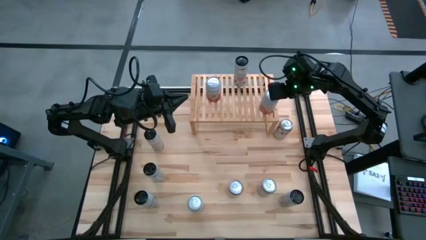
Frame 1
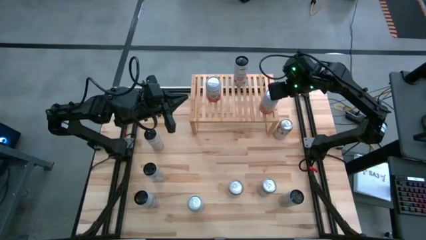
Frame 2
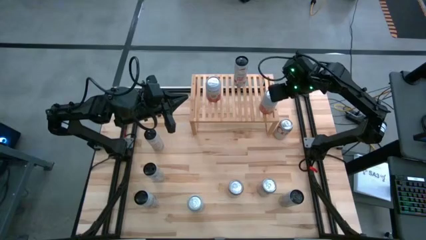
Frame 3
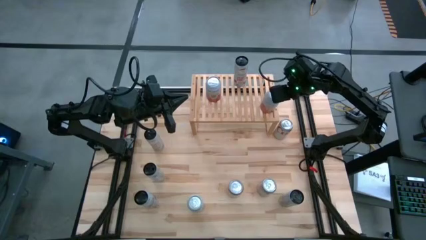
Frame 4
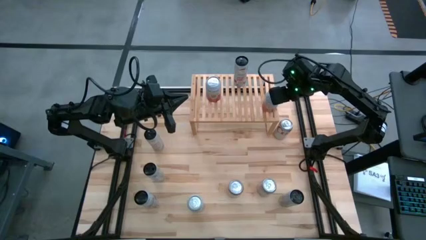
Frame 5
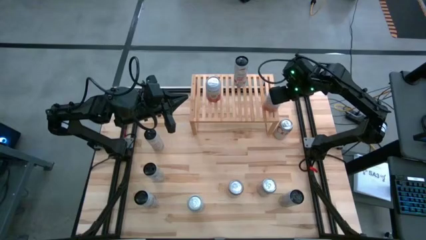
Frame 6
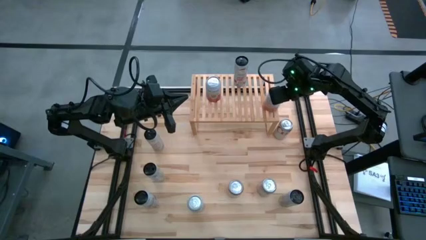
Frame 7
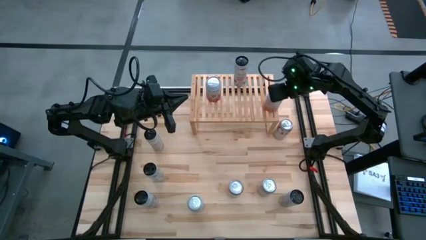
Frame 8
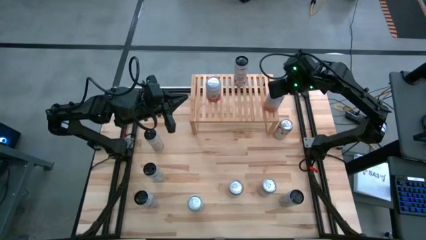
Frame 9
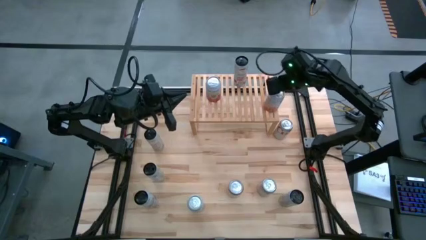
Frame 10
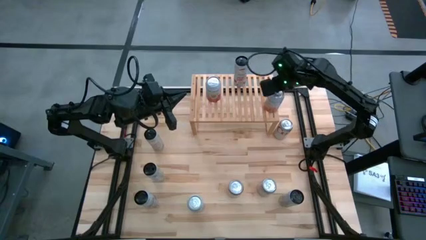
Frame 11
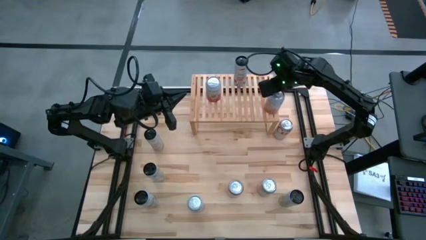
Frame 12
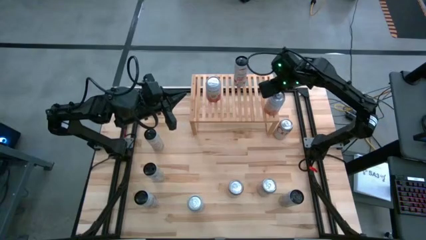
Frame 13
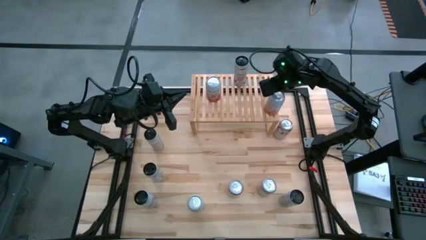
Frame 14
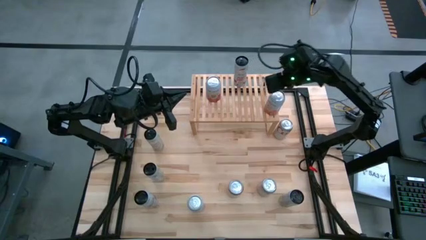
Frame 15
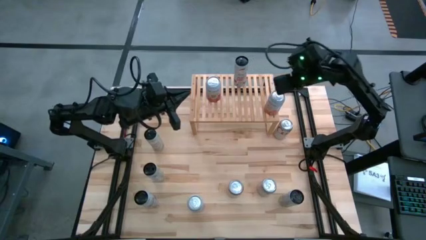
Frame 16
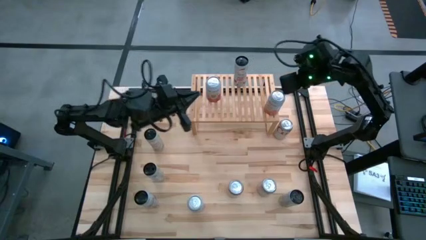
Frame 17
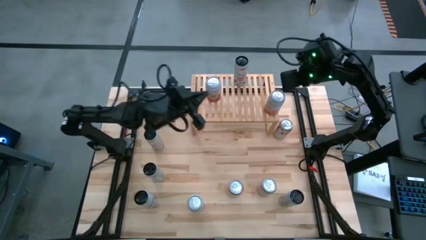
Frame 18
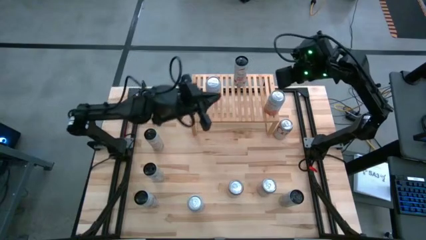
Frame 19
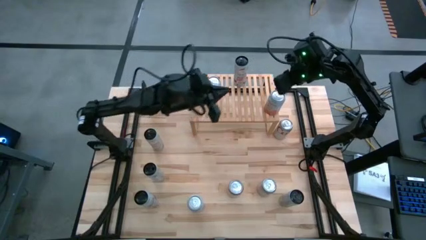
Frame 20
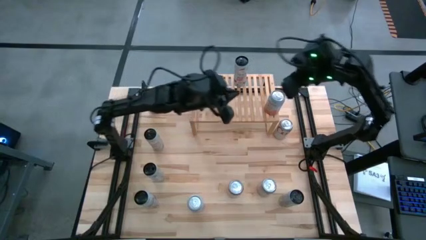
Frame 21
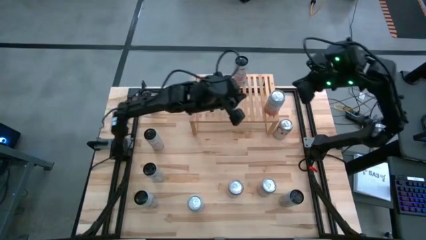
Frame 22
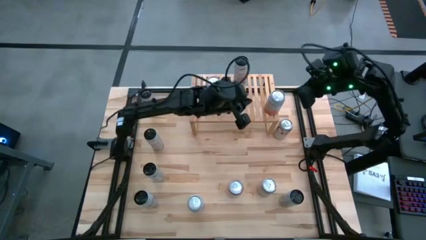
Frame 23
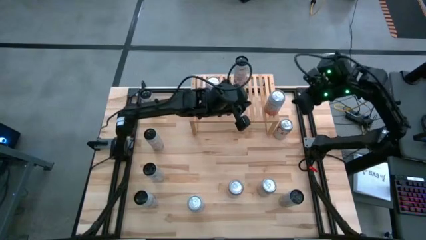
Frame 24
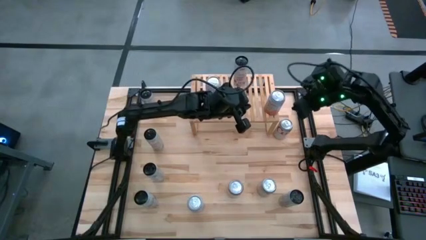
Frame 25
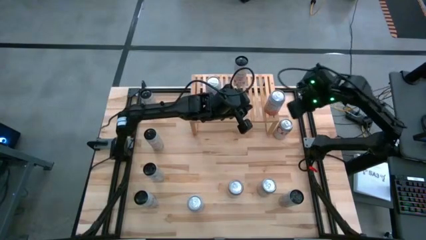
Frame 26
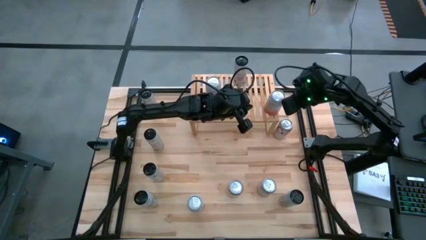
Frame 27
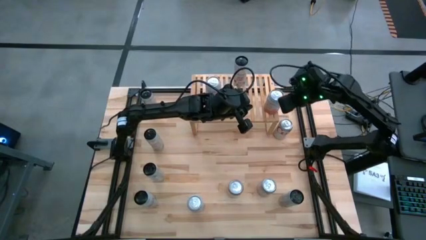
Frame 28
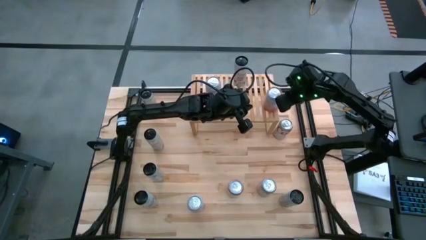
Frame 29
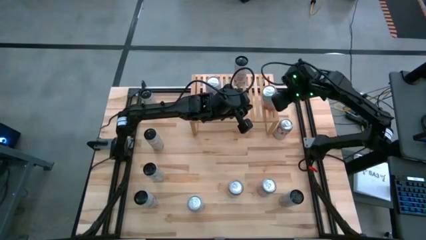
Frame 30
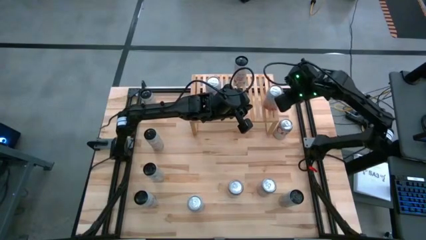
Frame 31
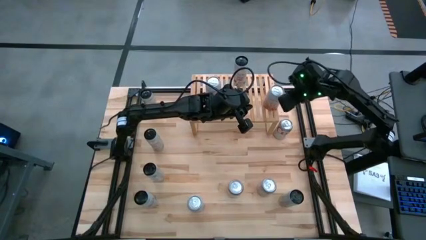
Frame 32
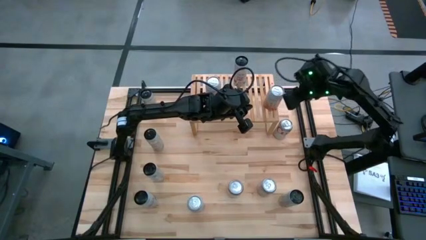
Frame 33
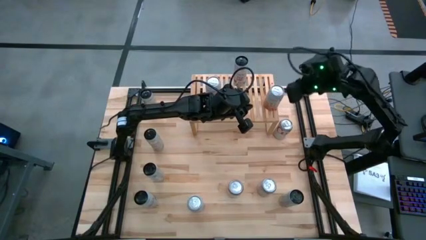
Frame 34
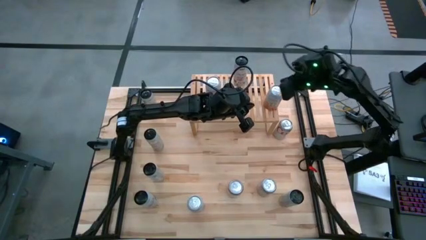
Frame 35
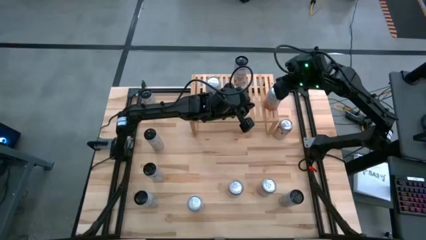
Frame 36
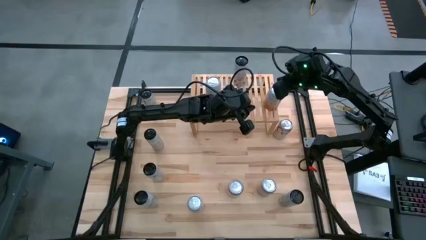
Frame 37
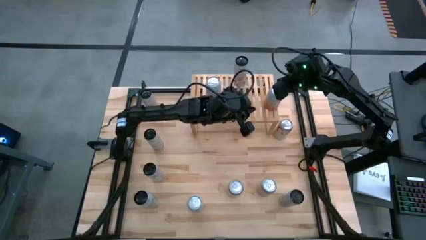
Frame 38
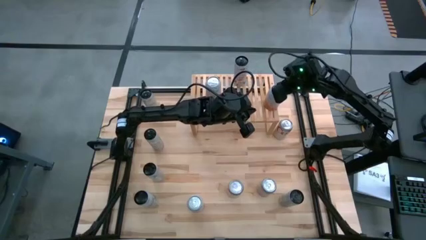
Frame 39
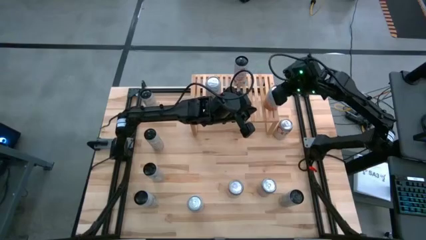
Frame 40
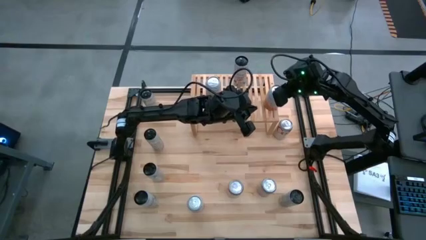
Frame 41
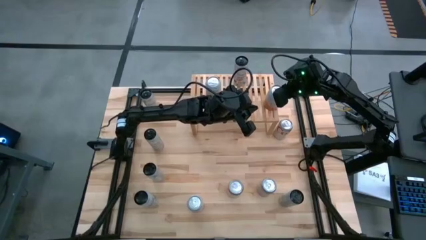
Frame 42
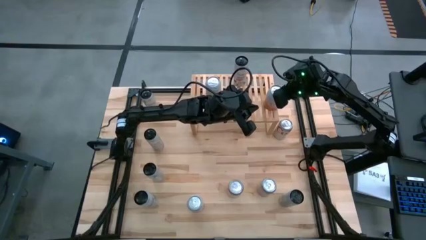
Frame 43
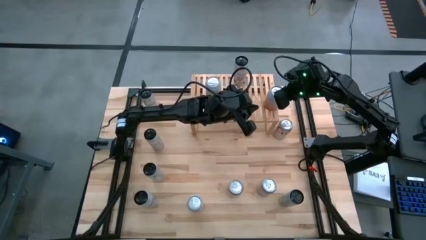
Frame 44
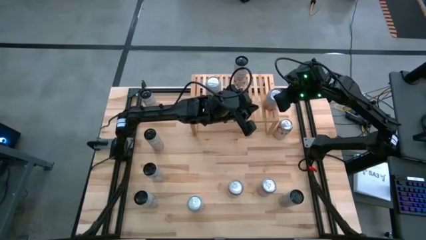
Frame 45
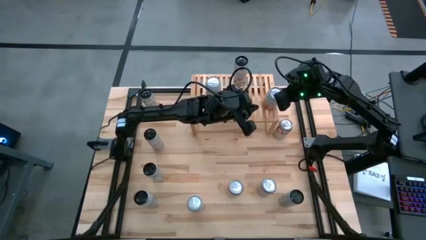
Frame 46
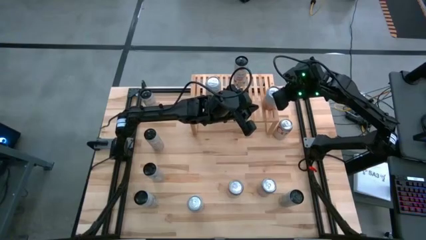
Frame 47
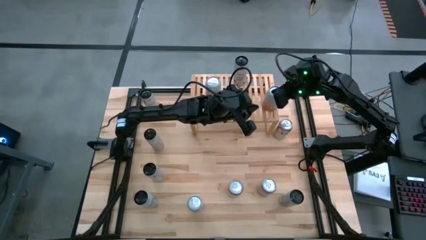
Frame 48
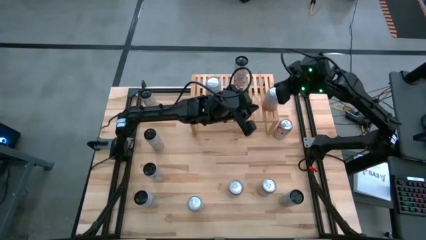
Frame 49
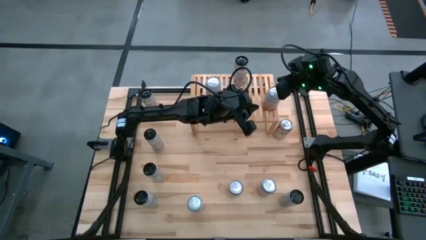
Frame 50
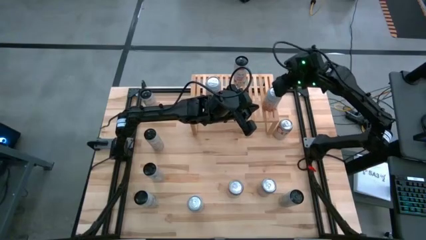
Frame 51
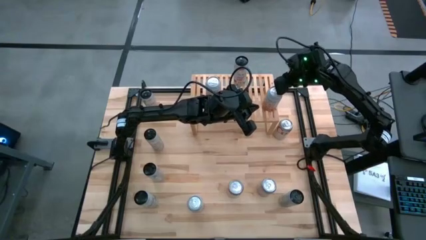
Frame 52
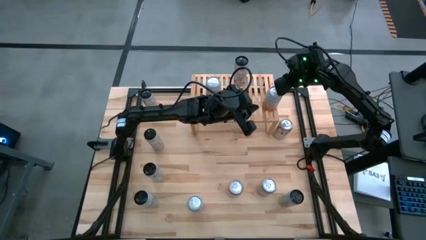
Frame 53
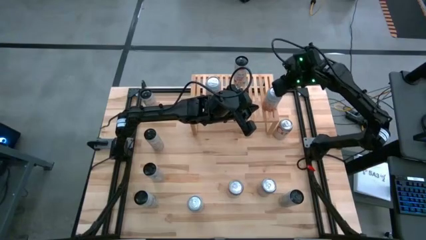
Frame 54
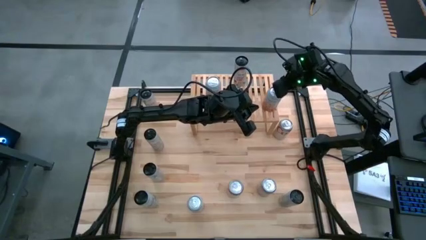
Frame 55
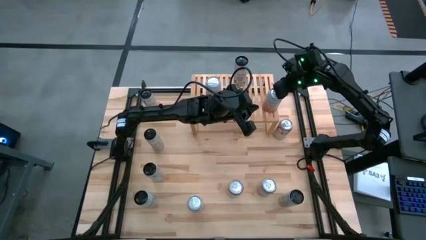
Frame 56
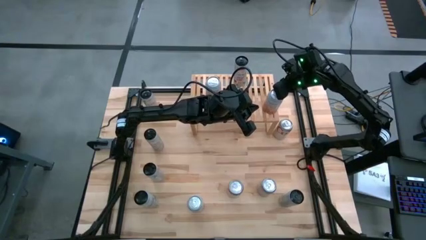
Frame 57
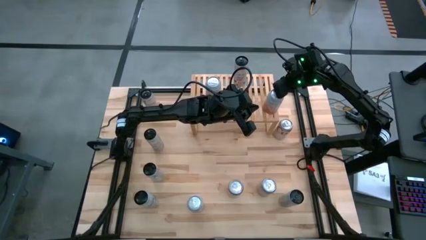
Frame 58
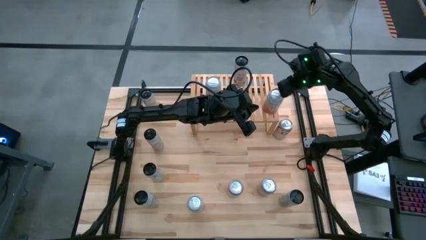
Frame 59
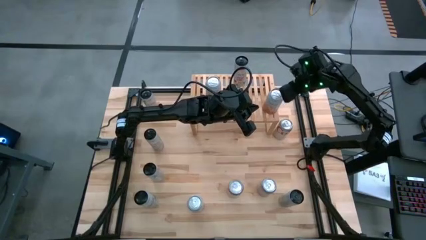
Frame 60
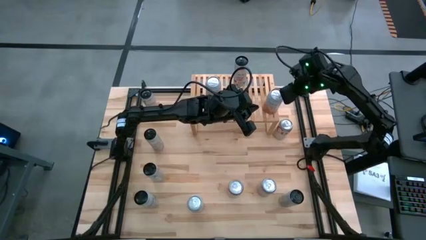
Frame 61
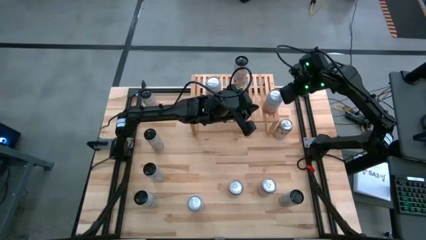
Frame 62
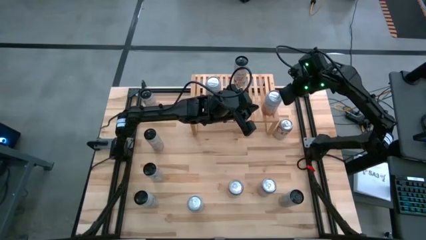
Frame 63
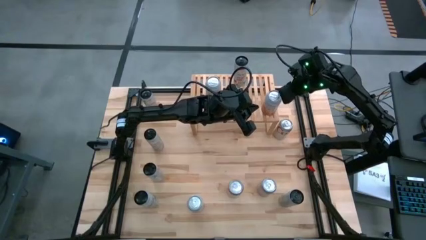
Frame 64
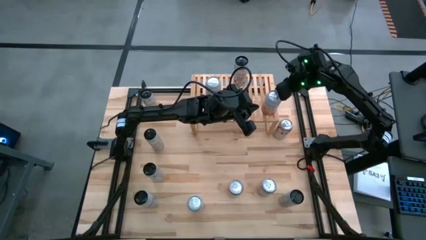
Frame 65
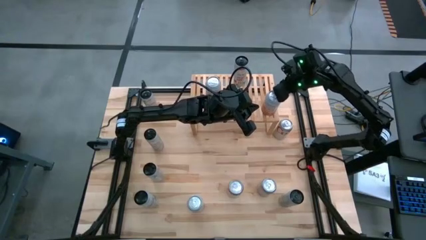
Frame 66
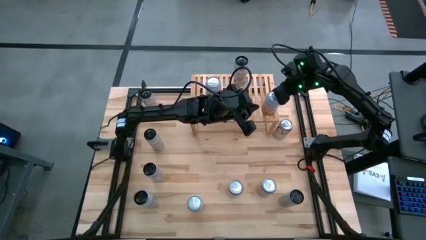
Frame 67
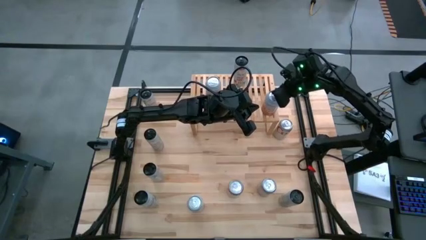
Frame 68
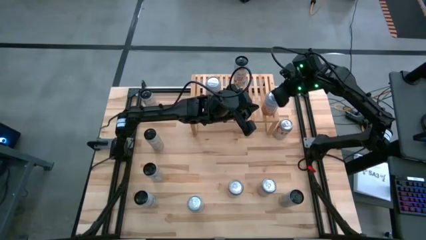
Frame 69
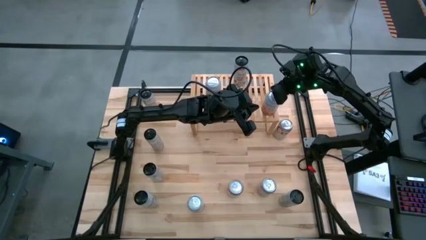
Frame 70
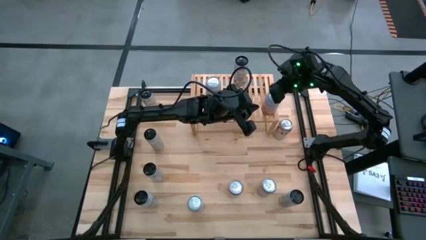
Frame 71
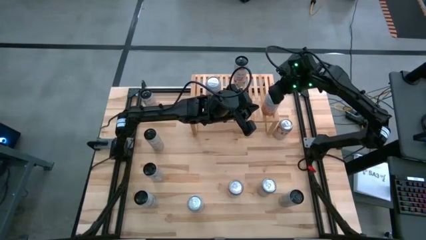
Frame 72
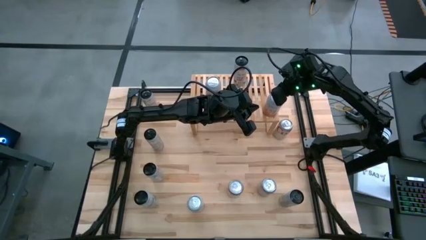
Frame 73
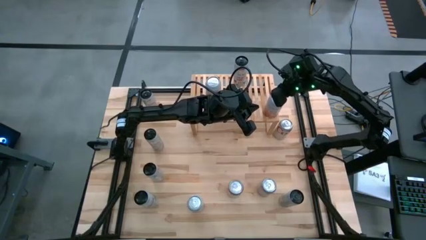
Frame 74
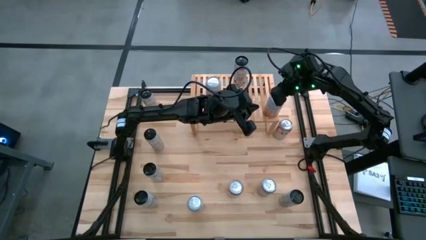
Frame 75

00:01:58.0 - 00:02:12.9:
Task: Place canned beverage on shelf
Put the orange and white soda can on the shelf

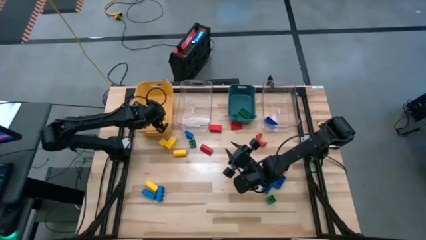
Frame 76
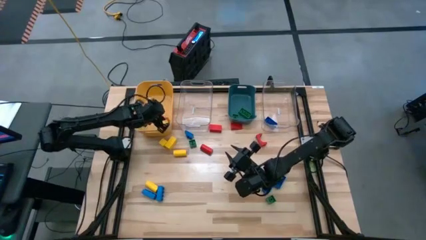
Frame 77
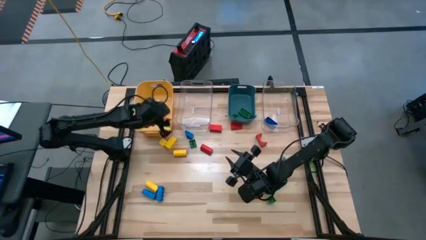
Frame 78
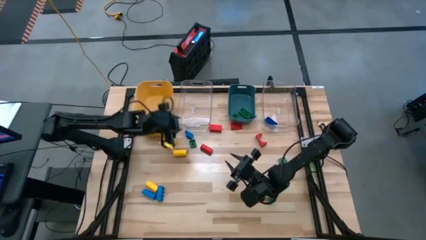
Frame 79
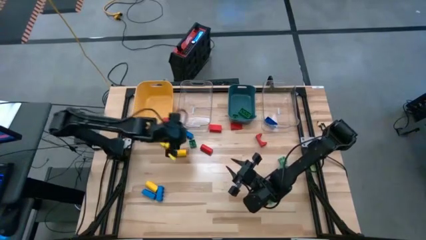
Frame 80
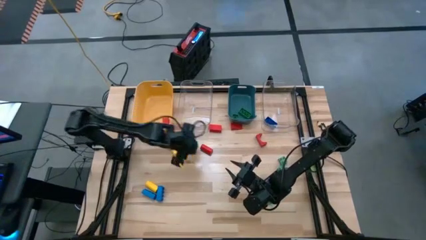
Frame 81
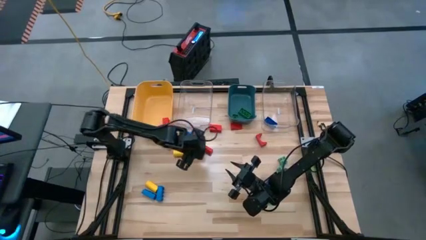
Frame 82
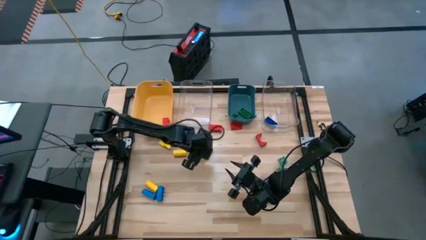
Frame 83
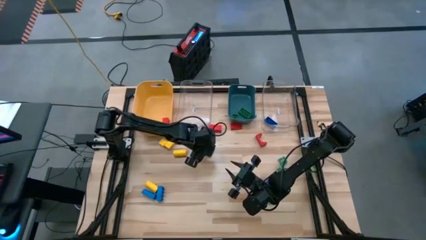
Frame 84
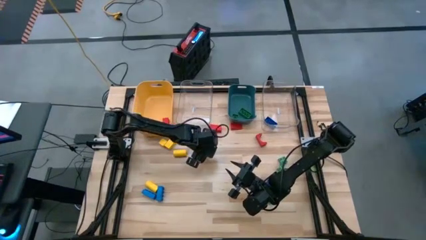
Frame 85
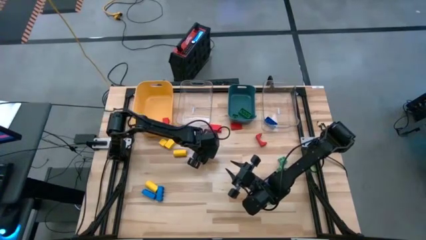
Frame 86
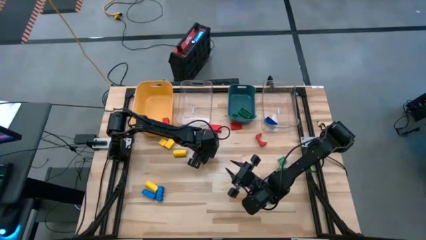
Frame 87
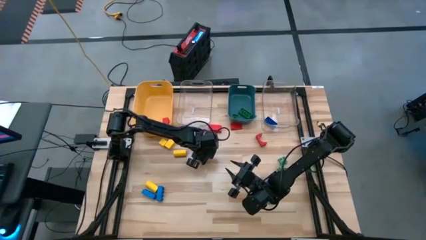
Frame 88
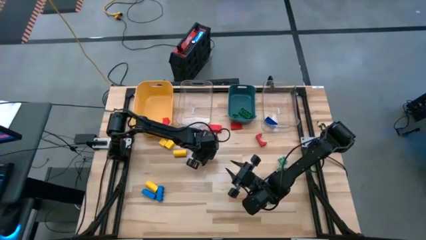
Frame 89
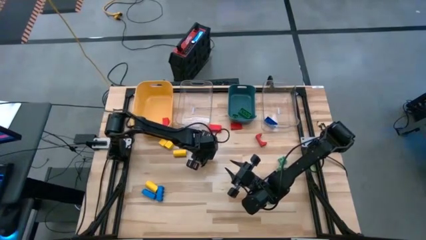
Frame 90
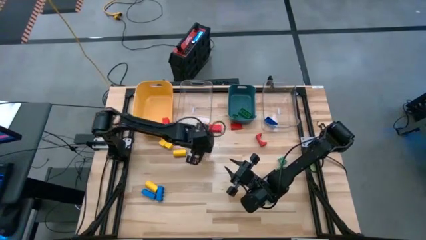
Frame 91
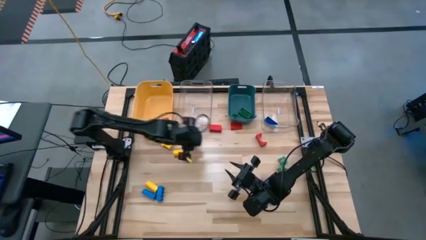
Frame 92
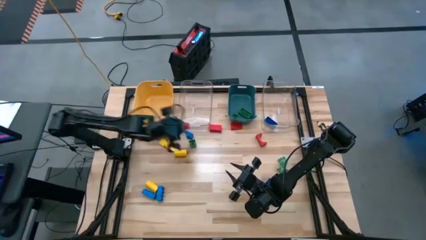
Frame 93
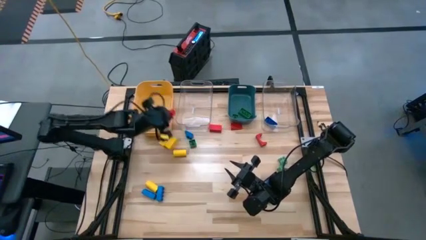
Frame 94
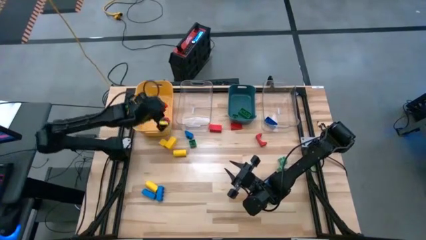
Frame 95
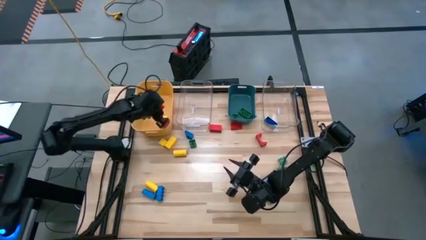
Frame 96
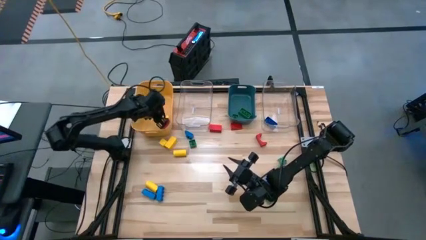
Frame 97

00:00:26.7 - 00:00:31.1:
Task: Sort blocks
Put the red block into the yellow bin
